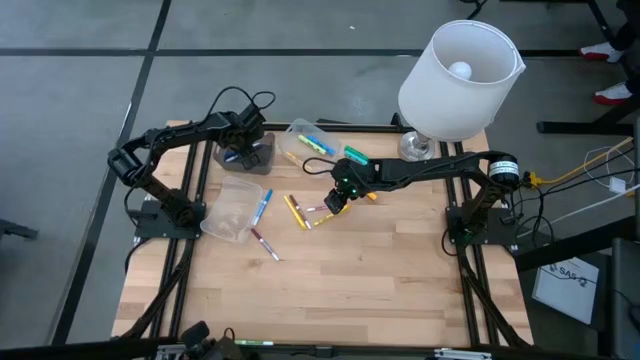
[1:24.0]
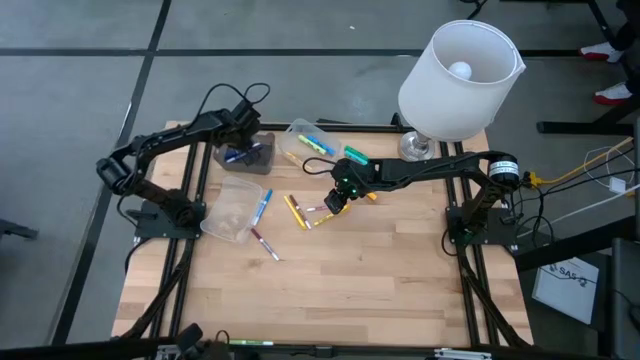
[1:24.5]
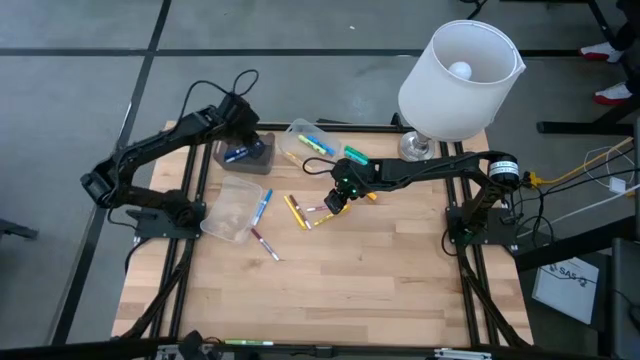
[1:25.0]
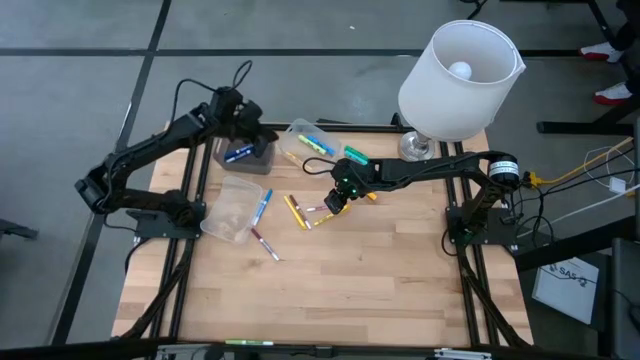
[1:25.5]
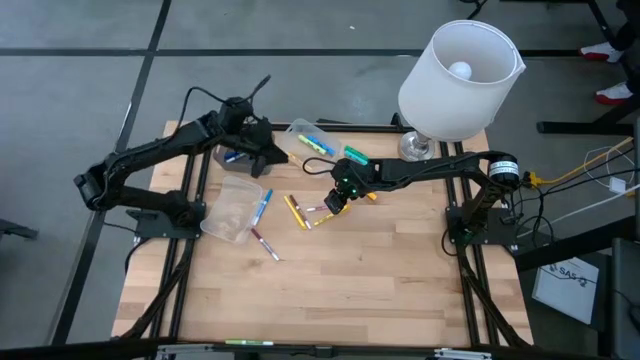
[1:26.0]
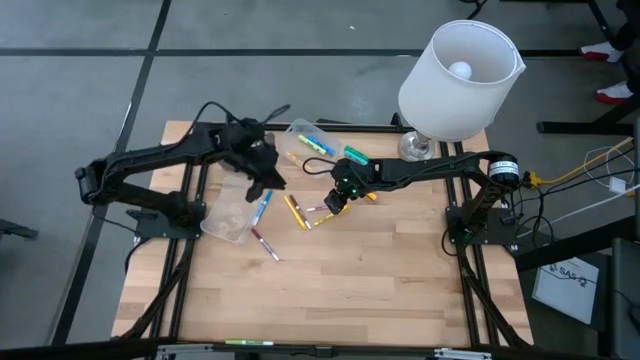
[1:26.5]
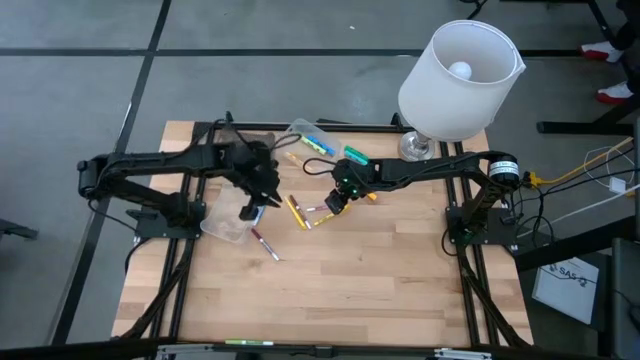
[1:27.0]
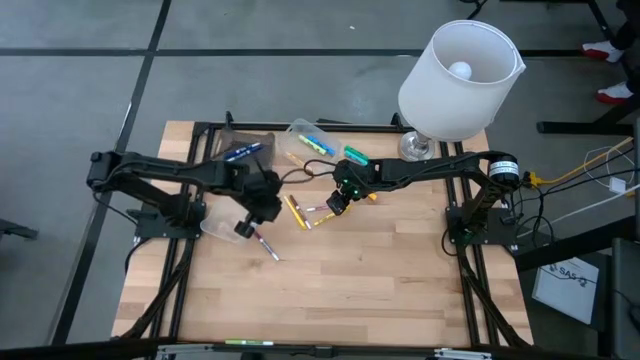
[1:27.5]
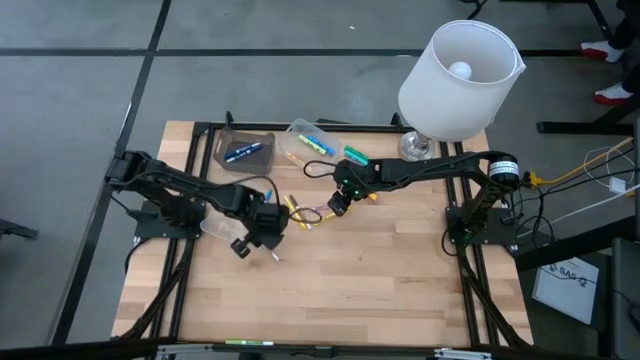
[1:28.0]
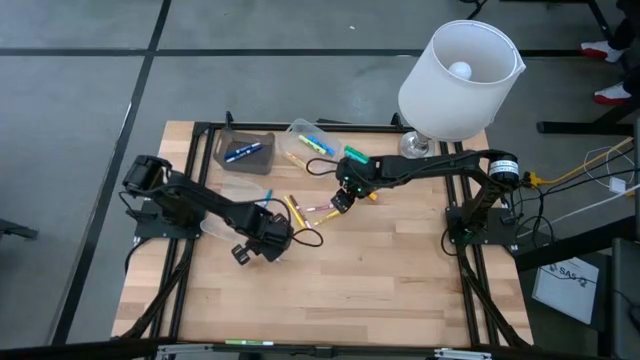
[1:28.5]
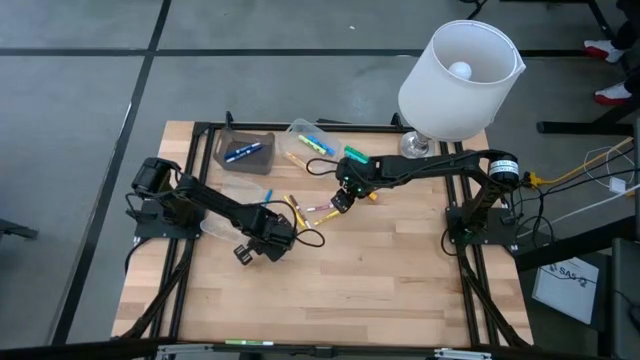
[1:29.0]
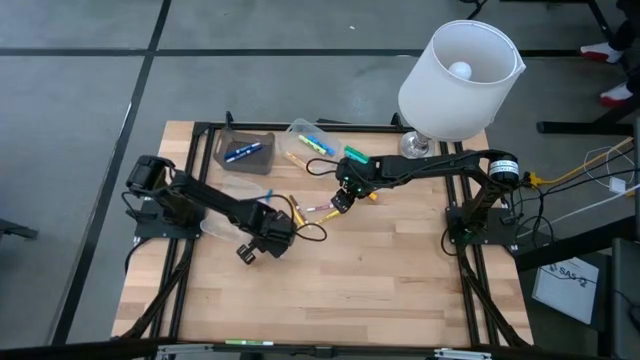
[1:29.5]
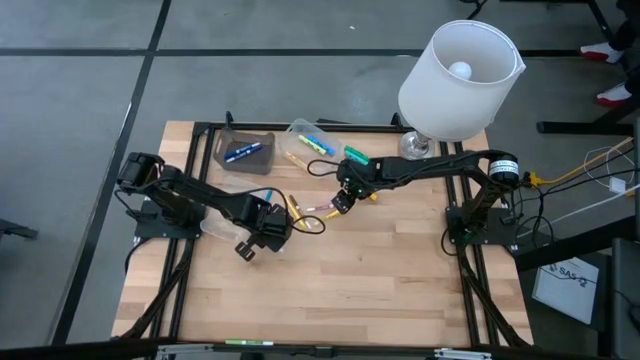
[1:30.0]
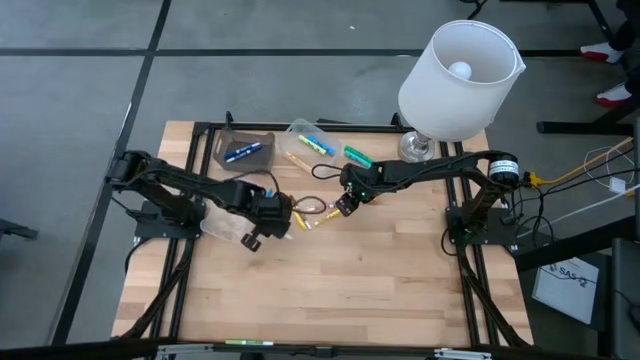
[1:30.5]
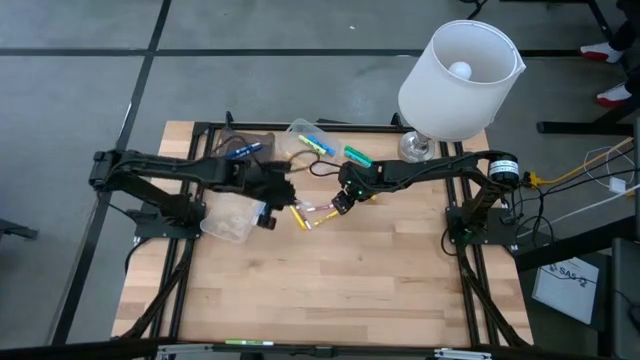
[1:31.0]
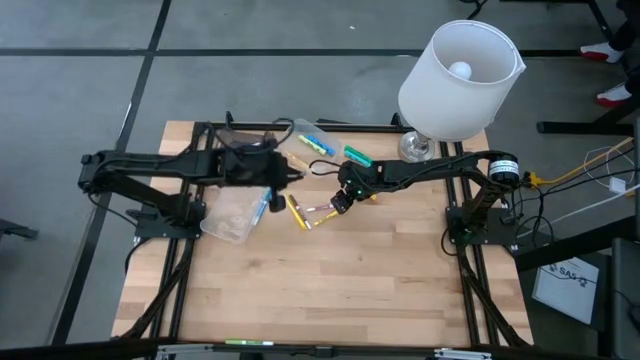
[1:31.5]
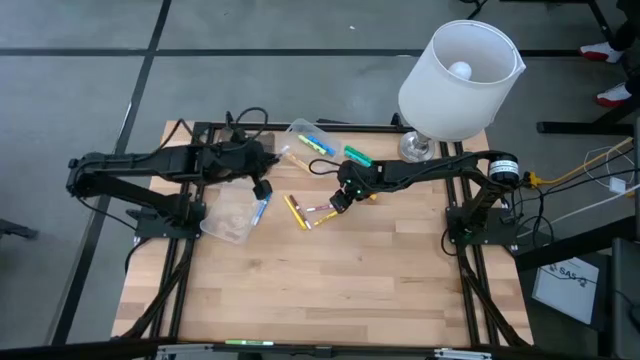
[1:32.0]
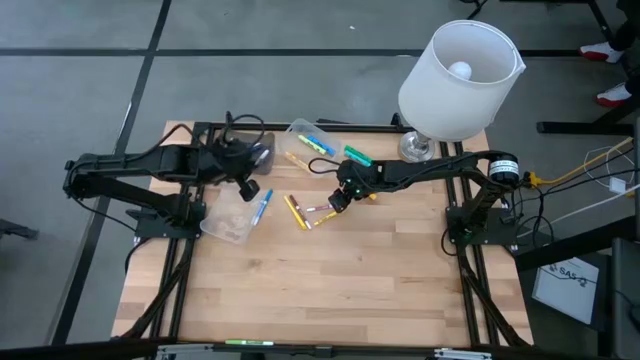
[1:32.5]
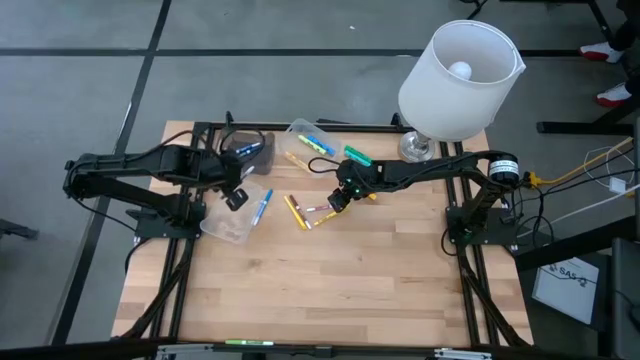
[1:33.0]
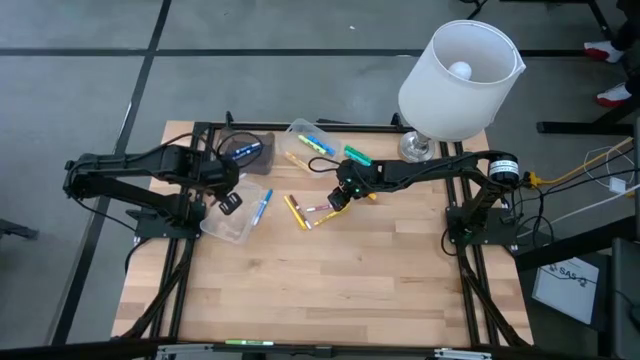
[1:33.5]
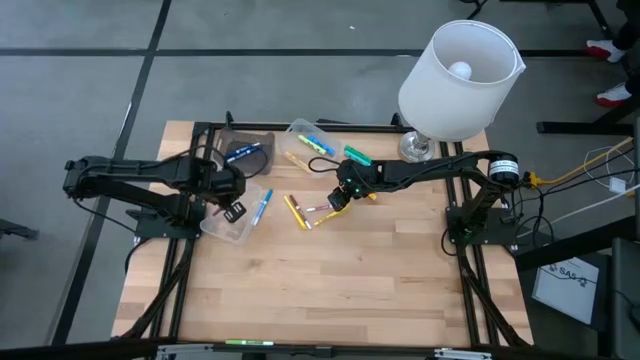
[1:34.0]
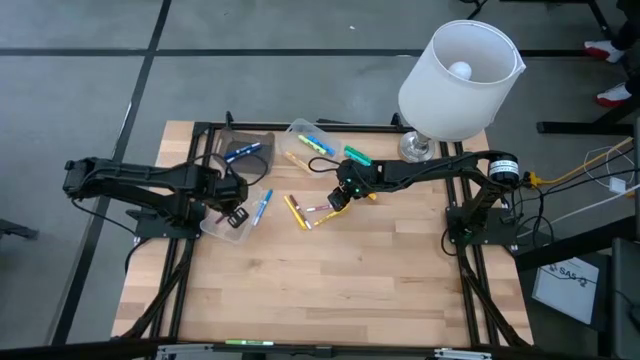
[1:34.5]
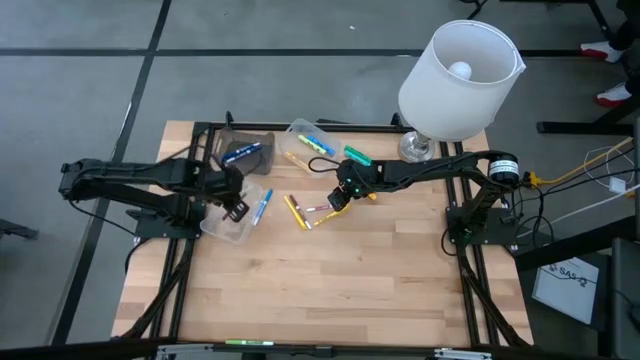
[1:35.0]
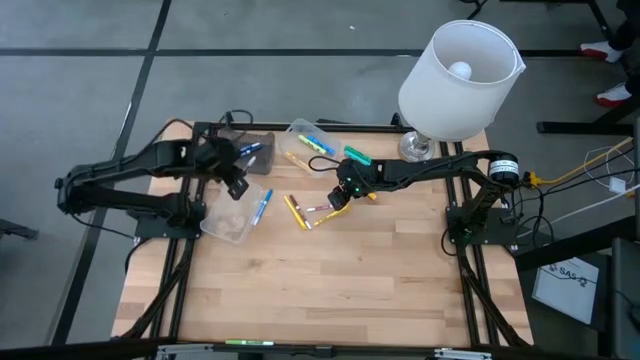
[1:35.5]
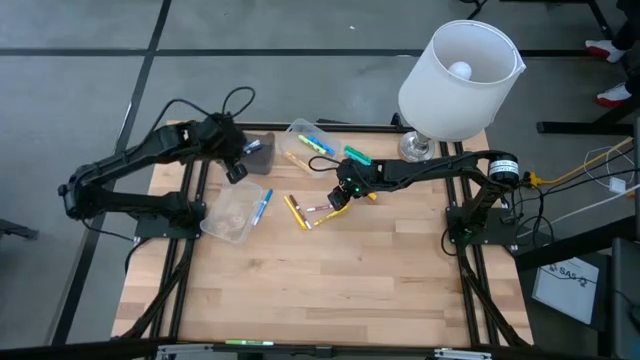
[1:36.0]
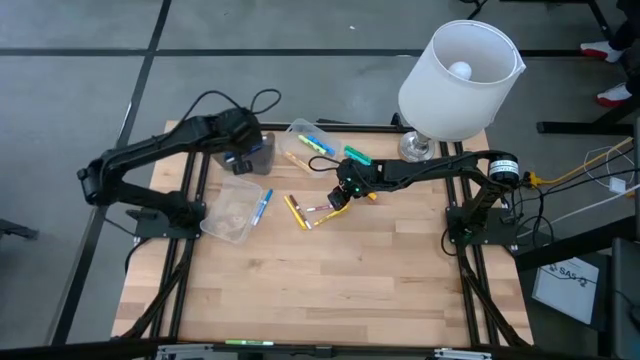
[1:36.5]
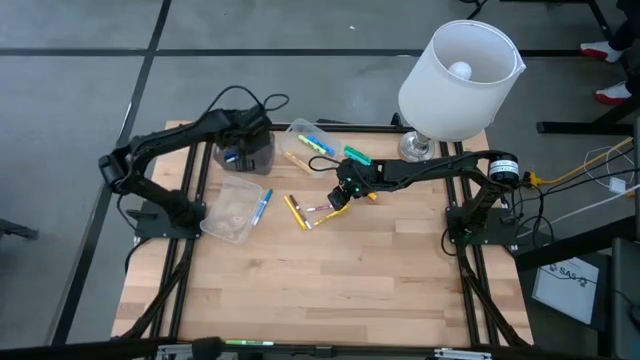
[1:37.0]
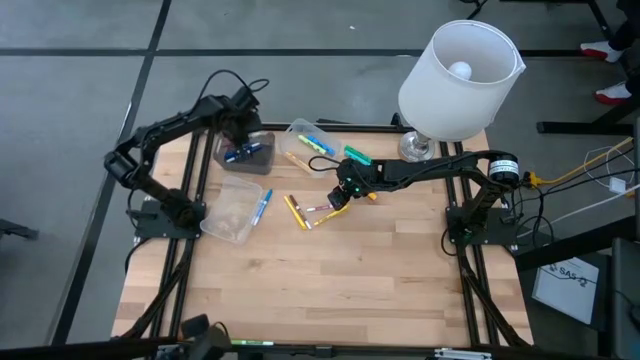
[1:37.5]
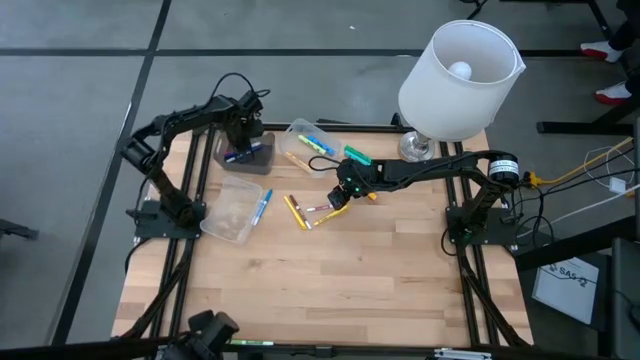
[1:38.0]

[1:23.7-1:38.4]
Task: Pick & Place Markers
Put the dark pink marker into the black bin

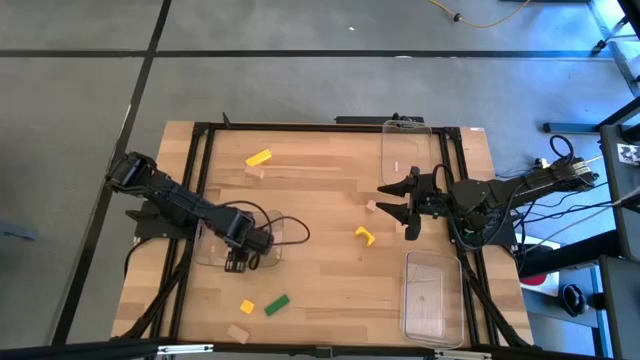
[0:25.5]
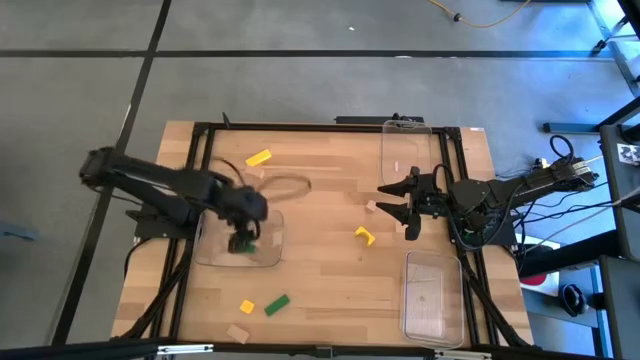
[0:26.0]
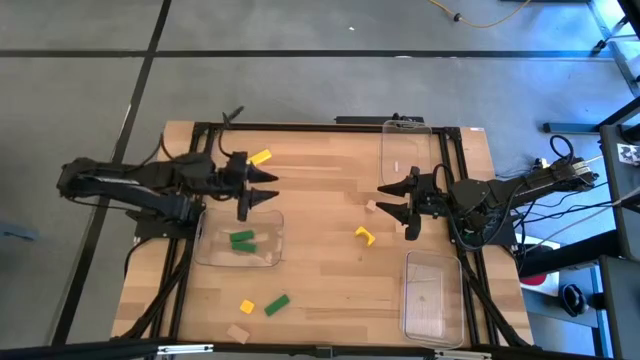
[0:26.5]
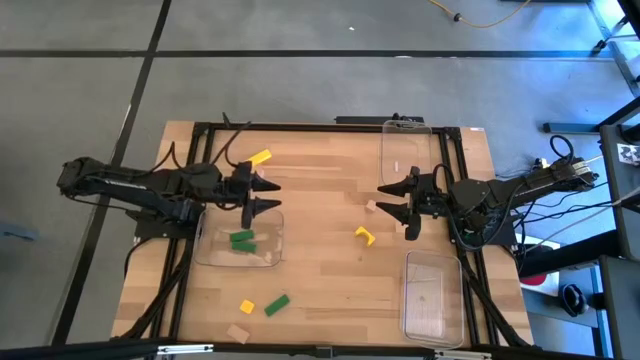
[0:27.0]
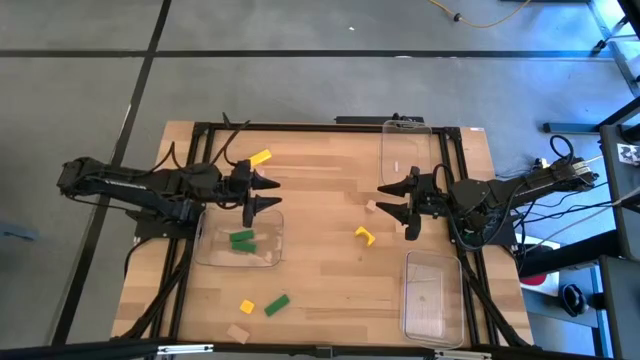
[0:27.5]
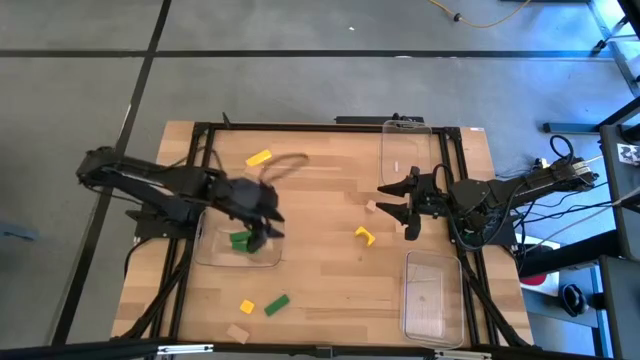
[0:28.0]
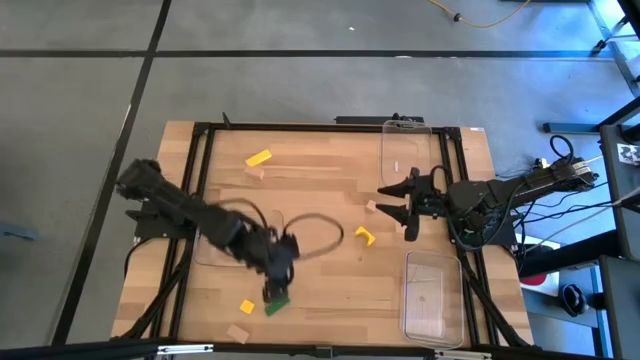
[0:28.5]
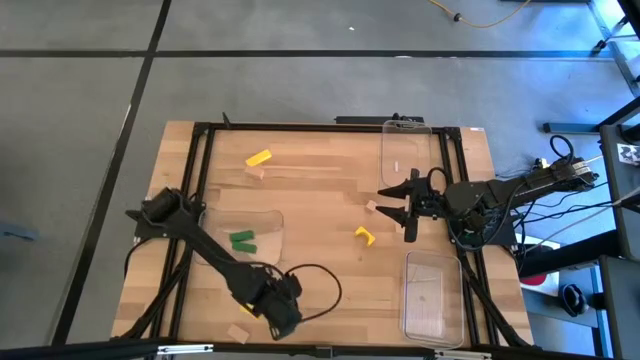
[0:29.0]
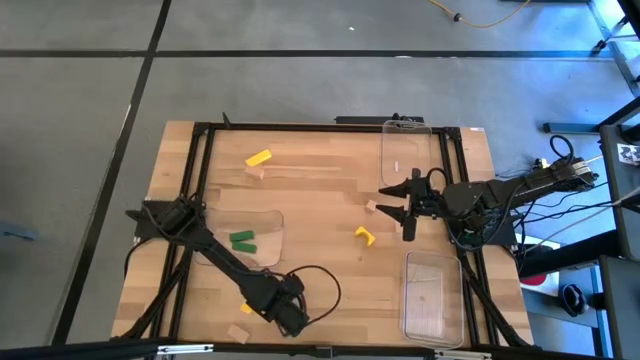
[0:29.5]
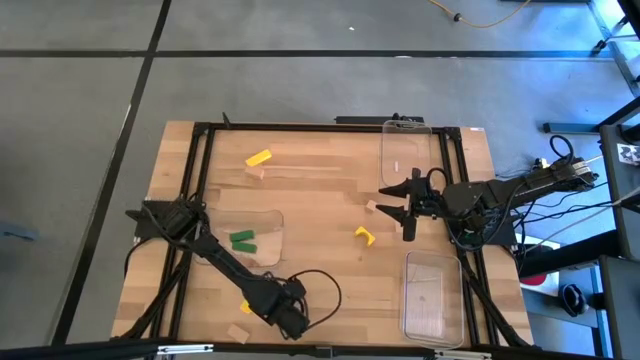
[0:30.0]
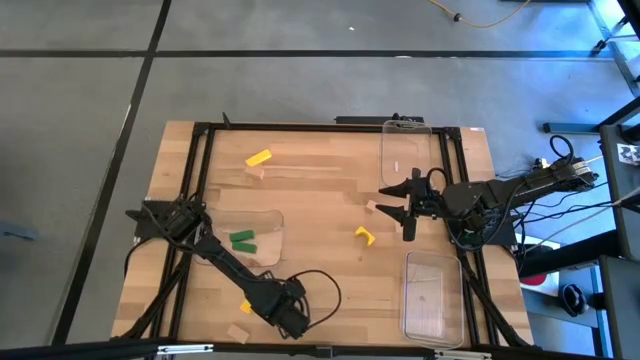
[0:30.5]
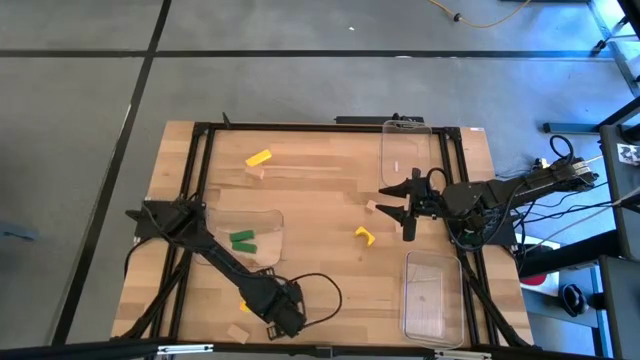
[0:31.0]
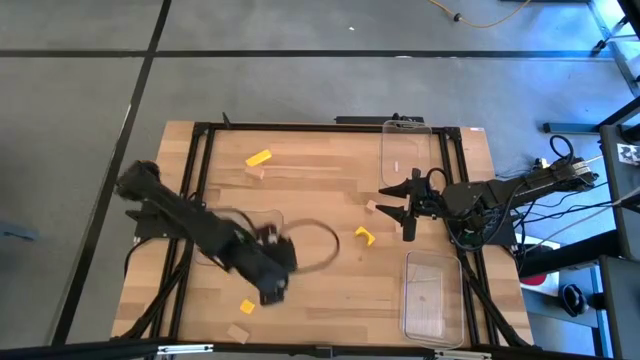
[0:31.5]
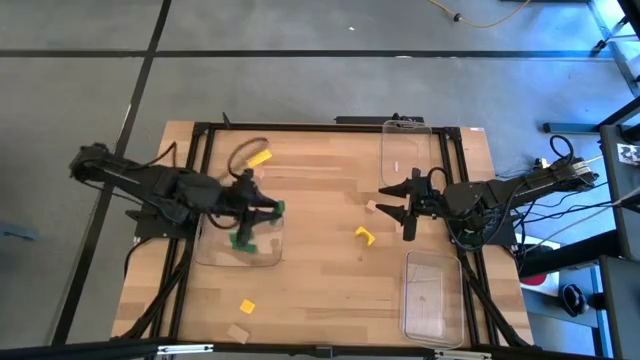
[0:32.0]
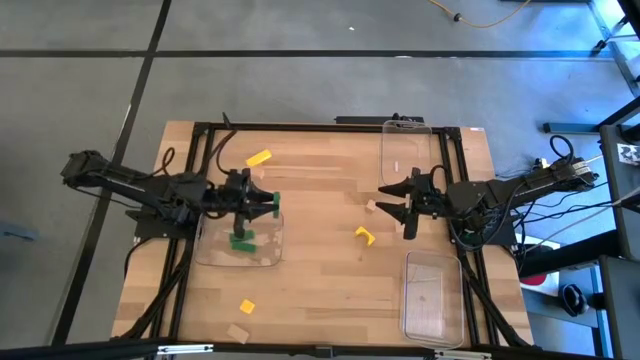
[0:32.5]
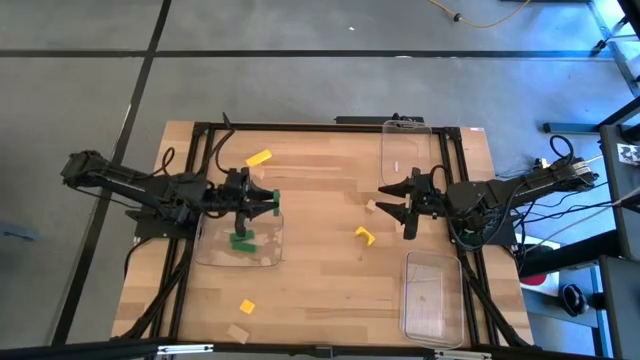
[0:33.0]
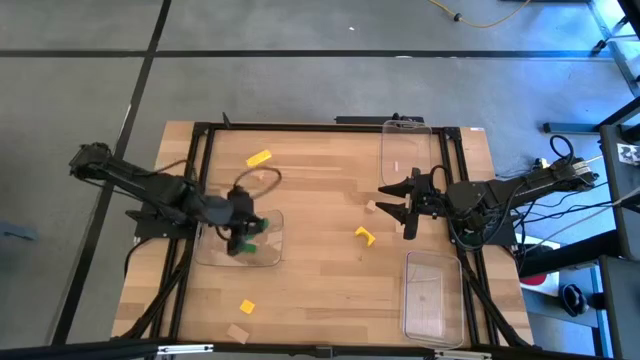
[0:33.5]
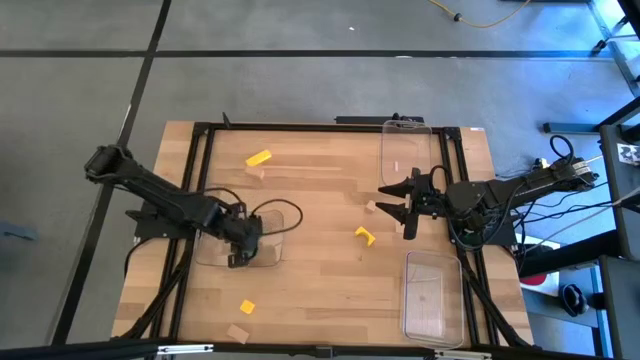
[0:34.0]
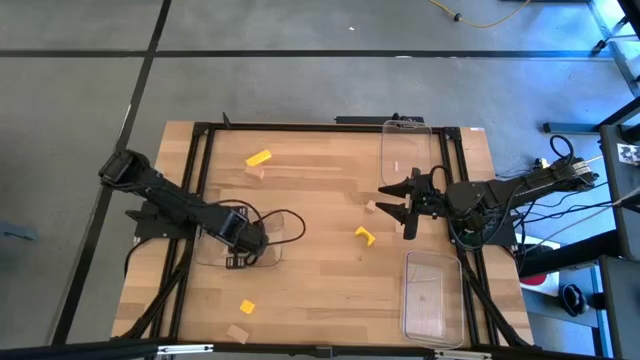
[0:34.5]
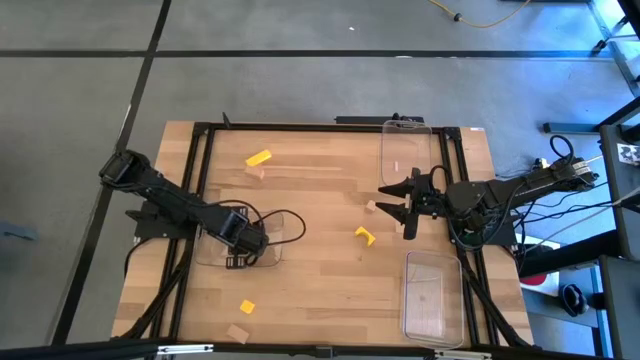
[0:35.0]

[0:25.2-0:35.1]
Task: Sort & place blocks by color
Put the green block into the left transparent bin
